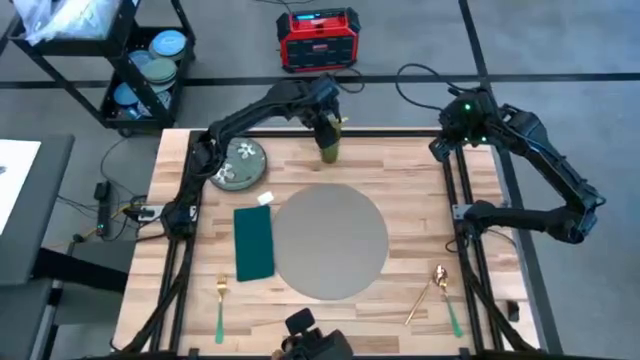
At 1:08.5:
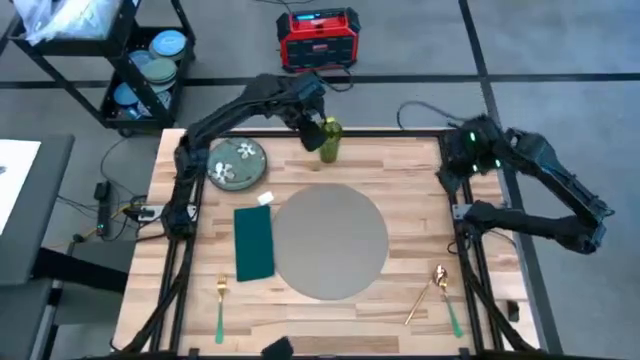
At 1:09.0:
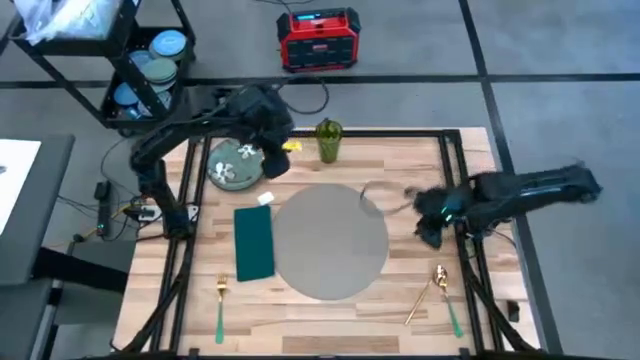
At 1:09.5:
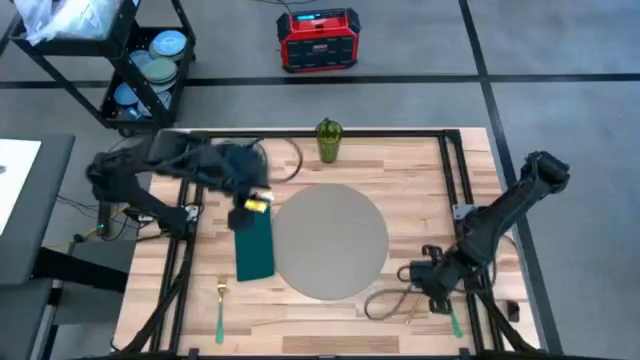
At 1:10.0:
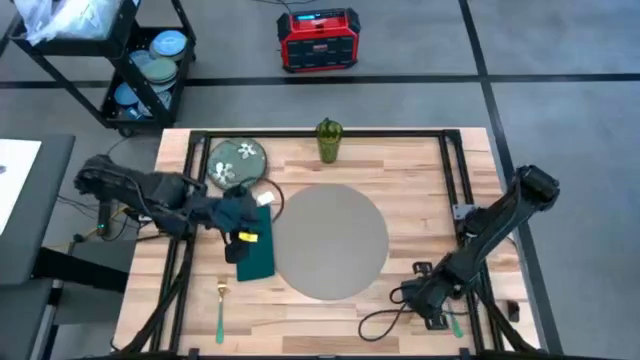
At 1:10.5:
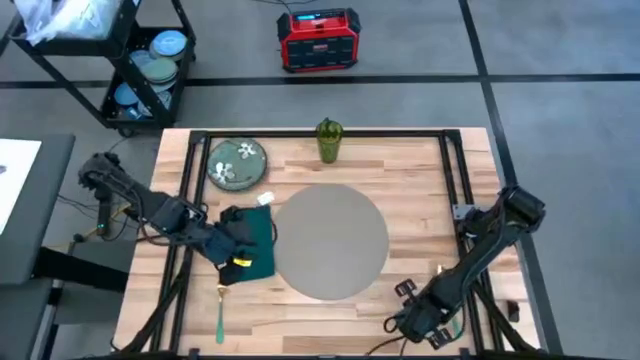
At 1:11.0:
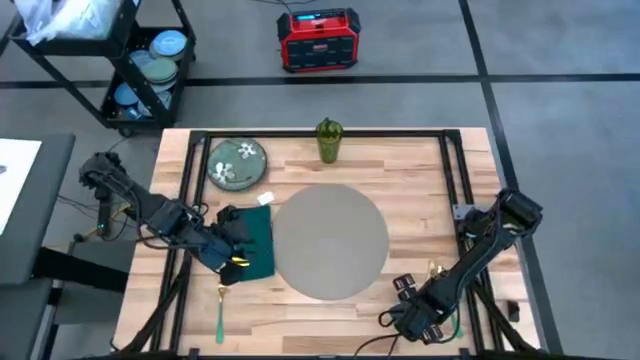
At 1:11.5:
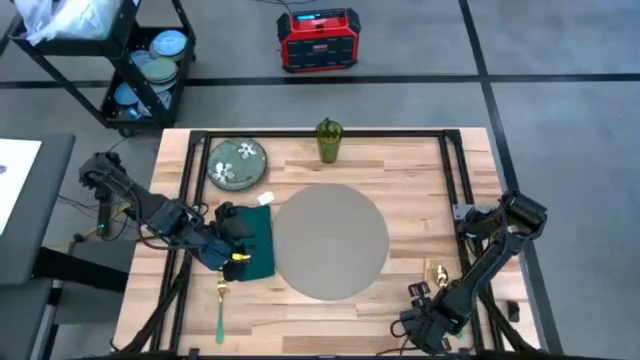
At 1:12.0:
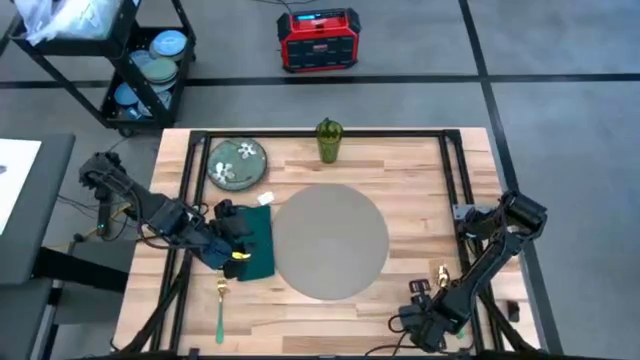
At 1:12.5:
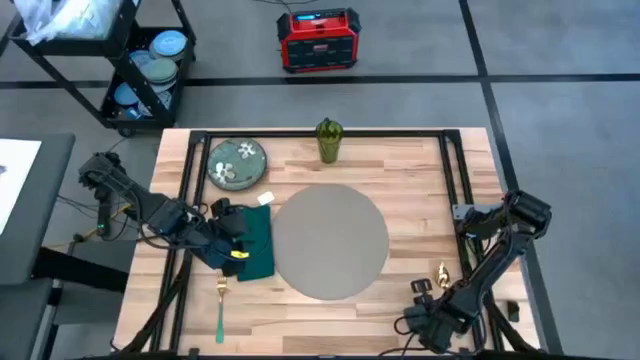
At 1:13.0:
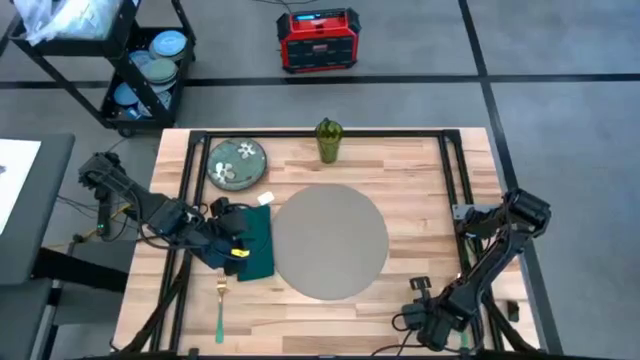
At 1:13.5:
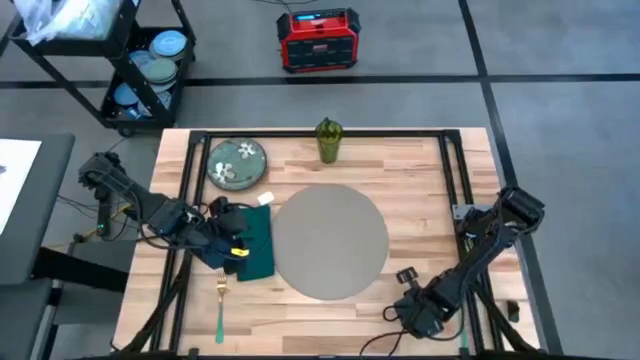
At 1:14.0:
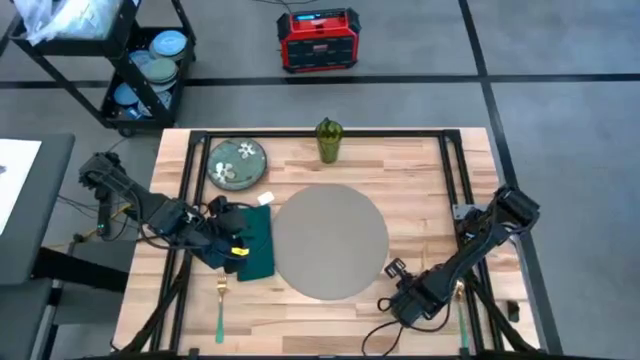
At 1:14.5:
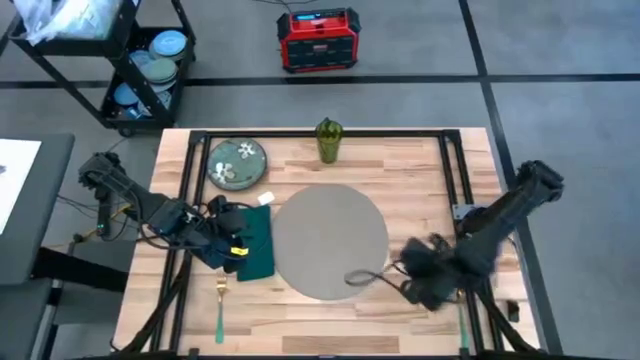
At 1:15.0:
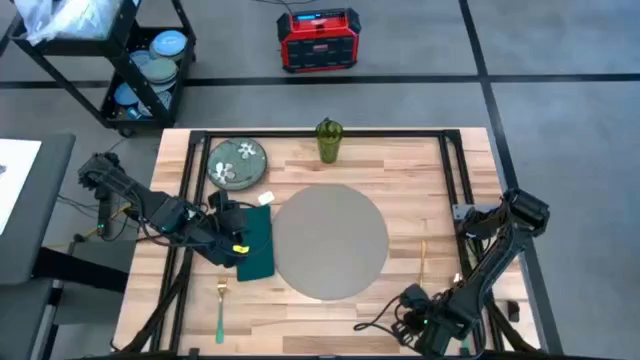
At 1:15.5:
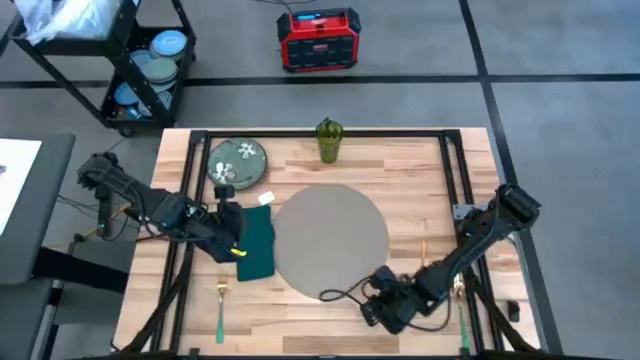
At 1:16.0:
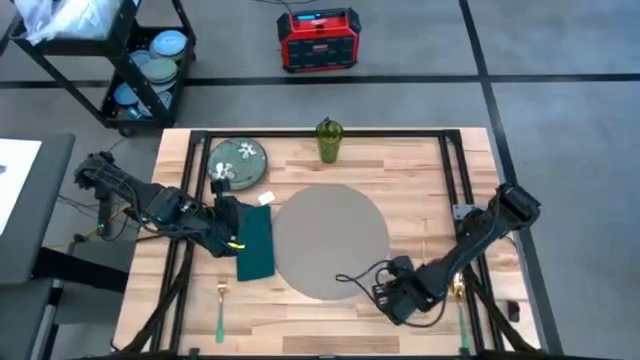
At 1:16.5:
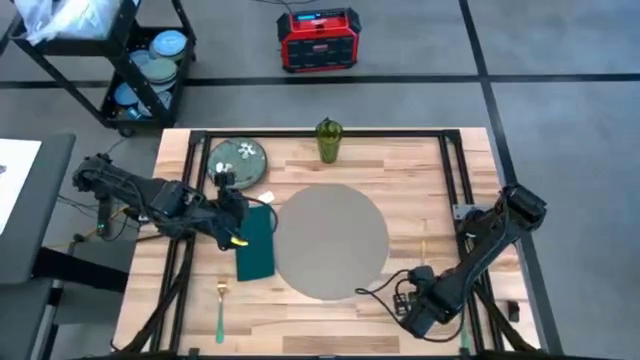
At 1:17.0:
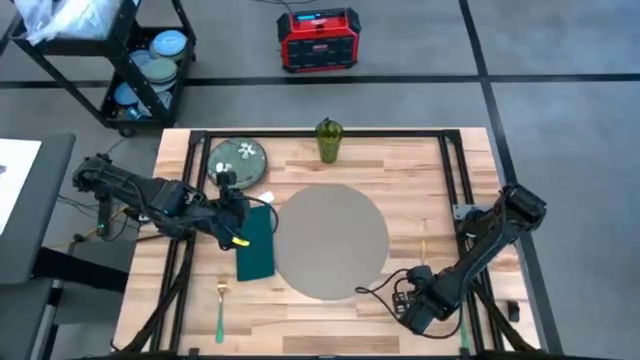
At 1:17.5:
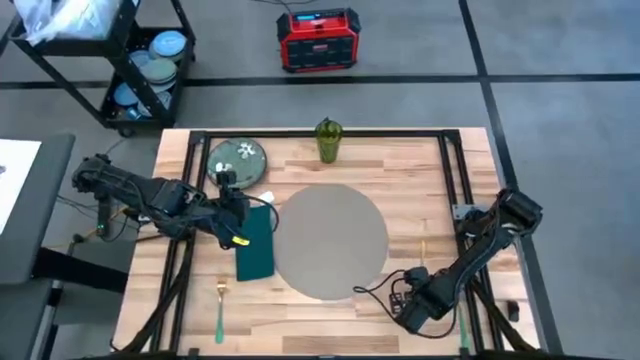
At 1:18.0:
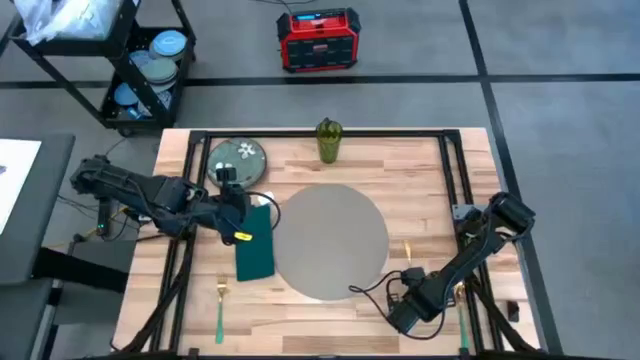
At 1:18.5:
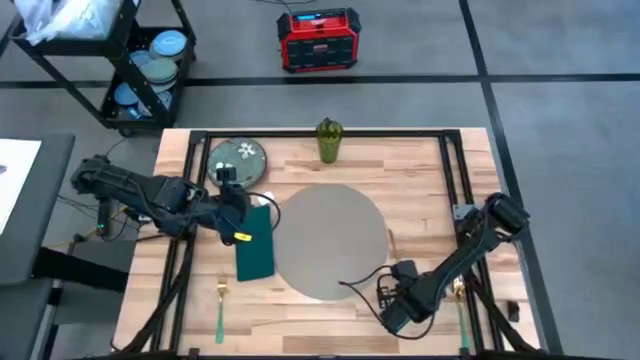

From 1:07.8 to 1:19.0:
Task: Set table place
Put the gold knife on the gray table mat

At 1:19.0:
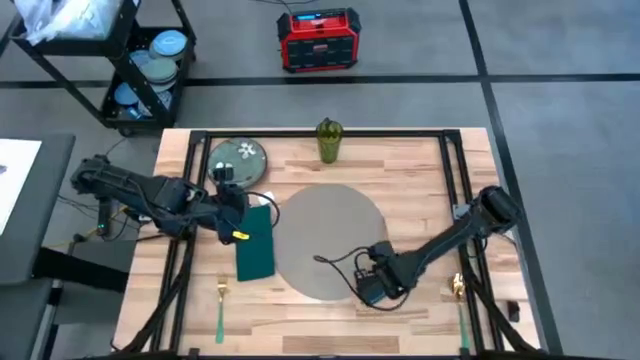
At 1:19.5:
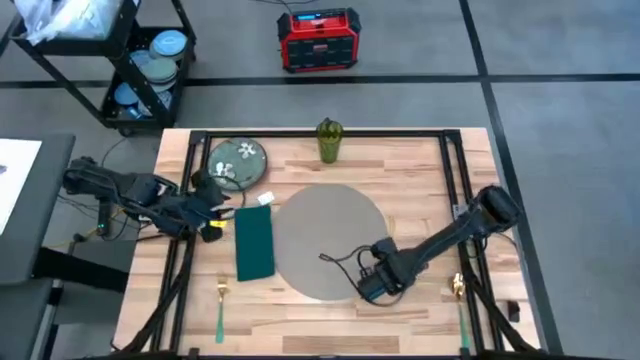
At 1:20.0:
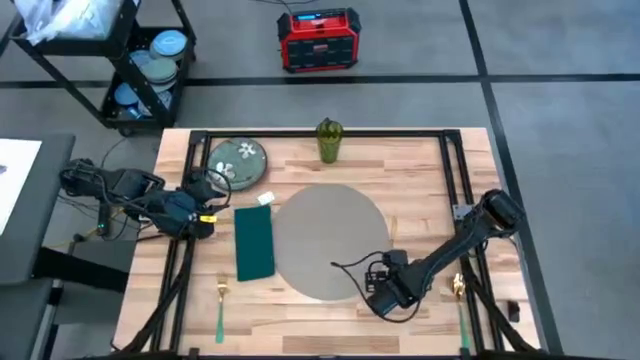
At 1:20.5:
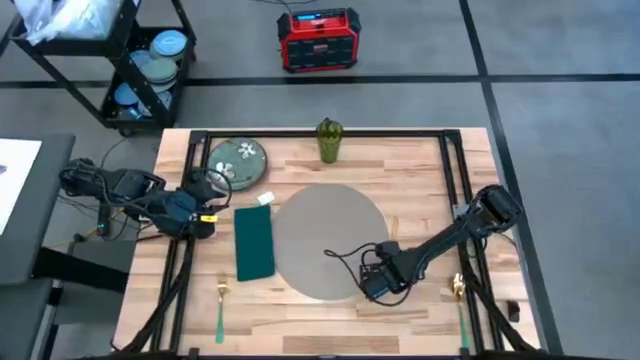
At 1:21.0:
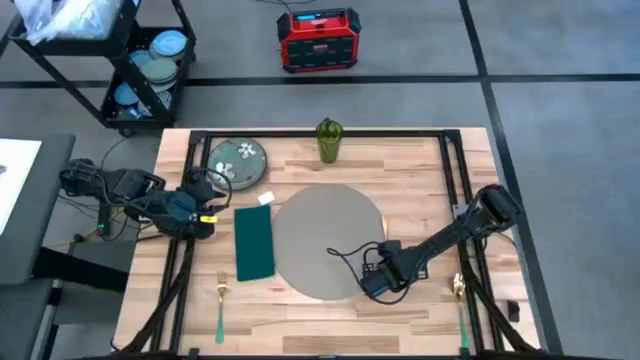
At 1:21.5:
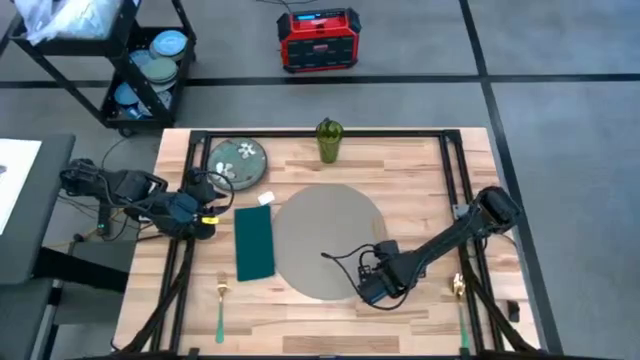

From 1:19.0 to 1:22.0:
Put the gold knife on the gray table mat

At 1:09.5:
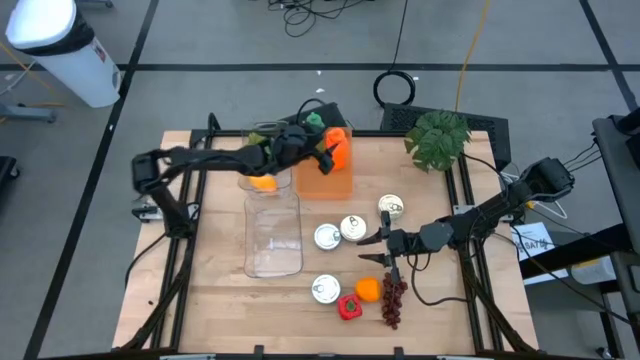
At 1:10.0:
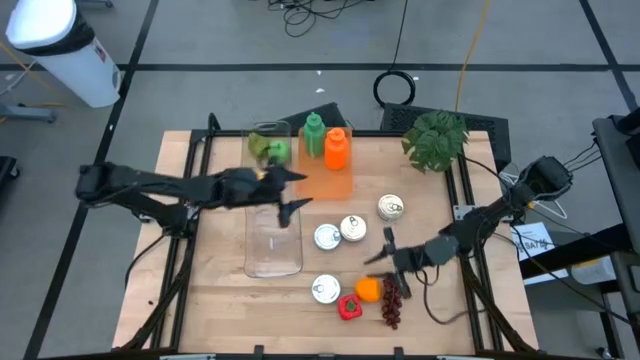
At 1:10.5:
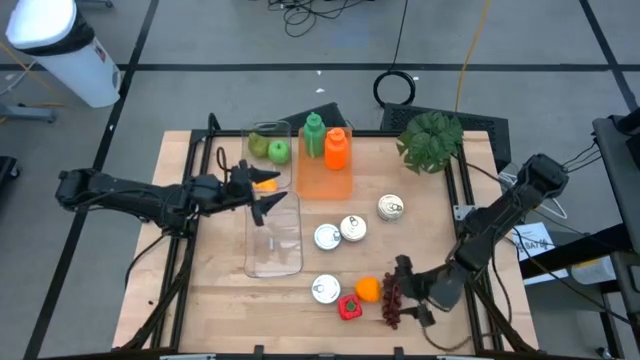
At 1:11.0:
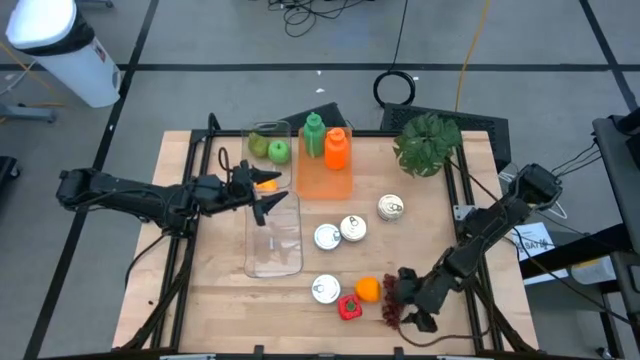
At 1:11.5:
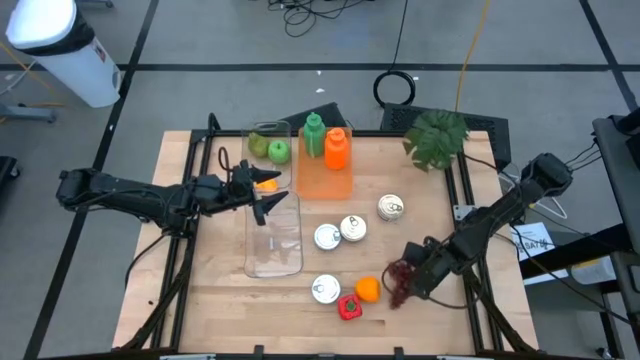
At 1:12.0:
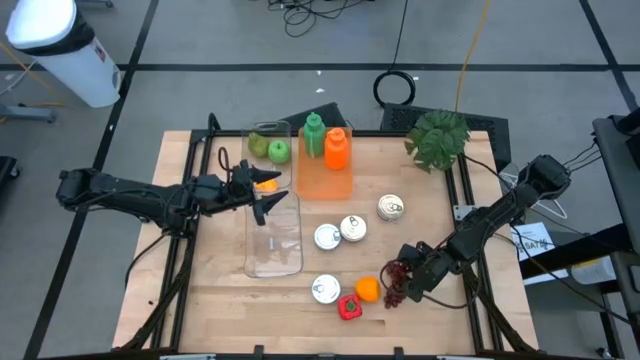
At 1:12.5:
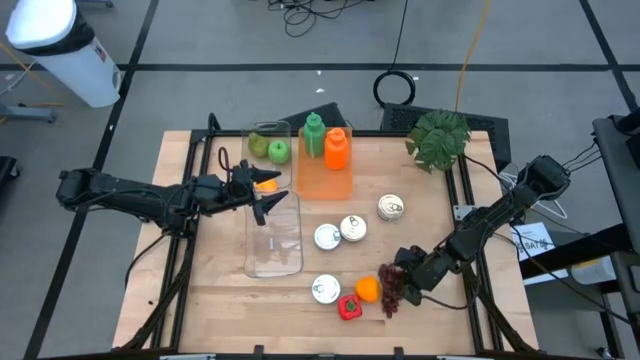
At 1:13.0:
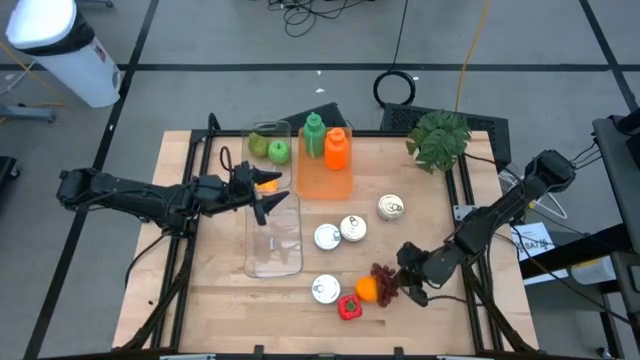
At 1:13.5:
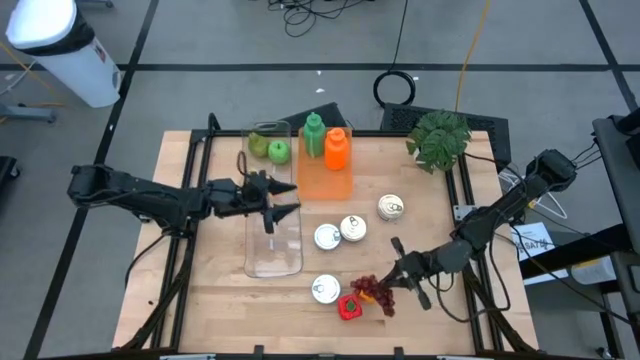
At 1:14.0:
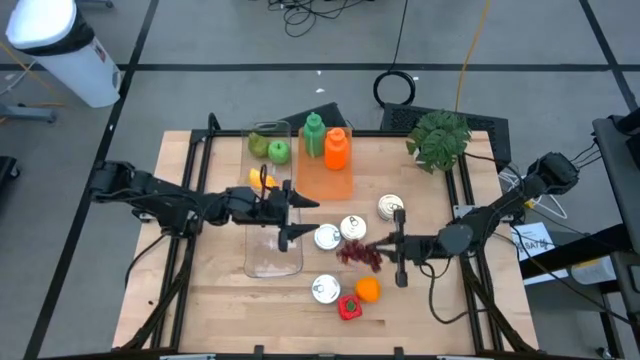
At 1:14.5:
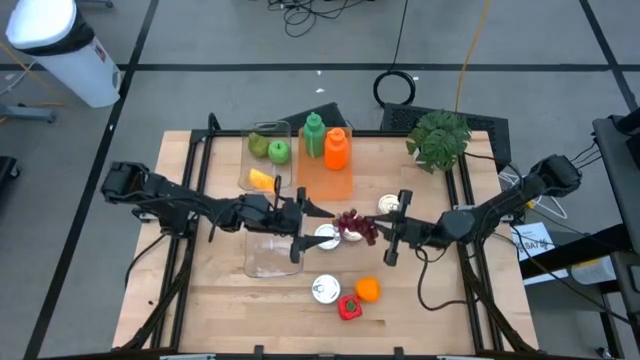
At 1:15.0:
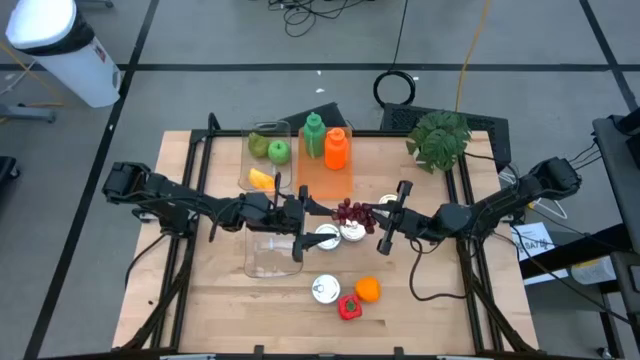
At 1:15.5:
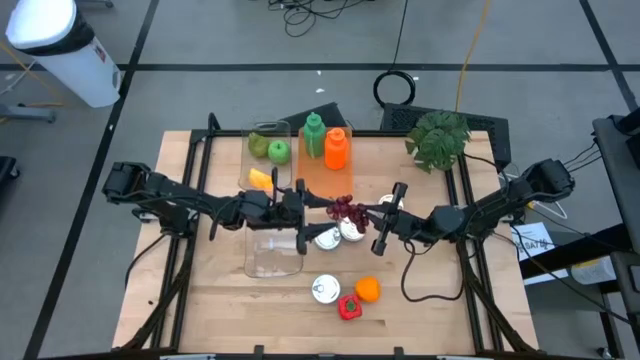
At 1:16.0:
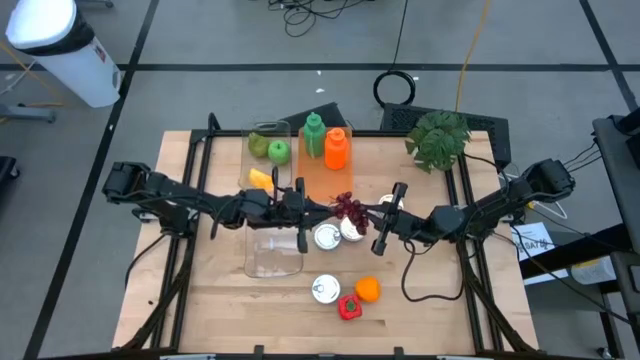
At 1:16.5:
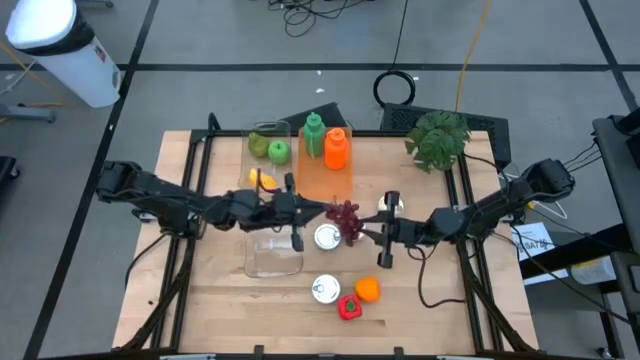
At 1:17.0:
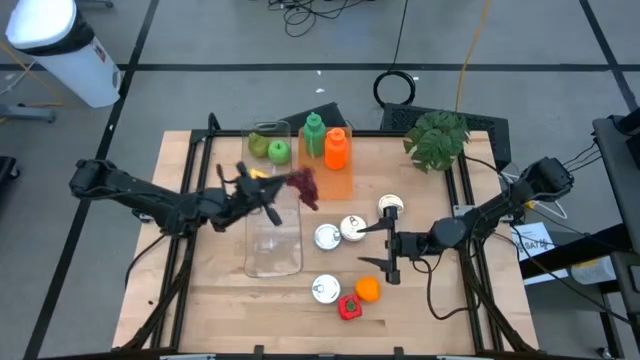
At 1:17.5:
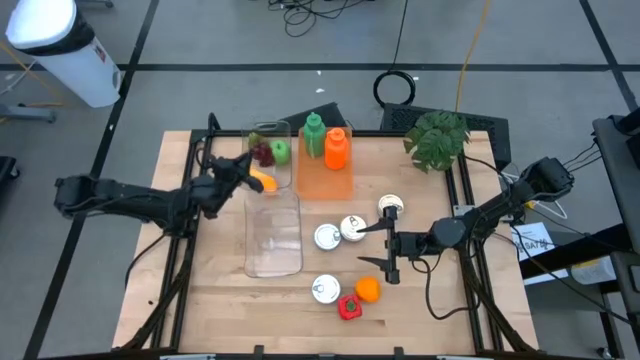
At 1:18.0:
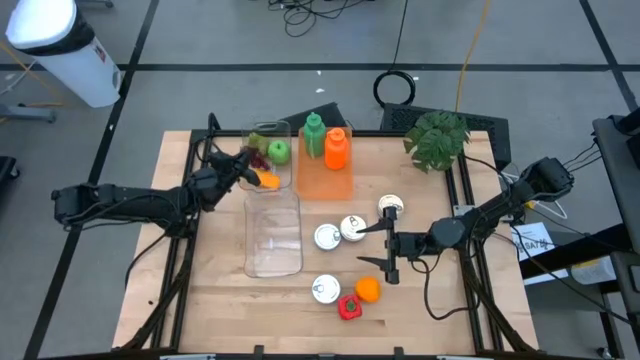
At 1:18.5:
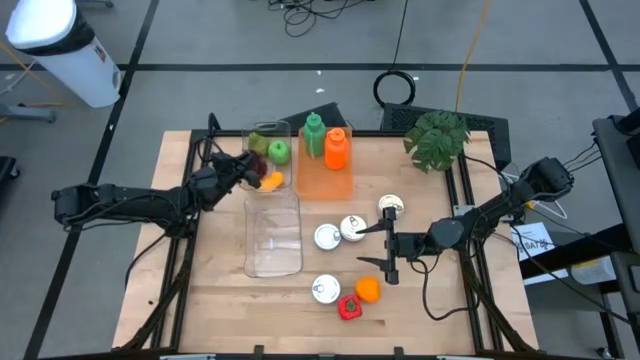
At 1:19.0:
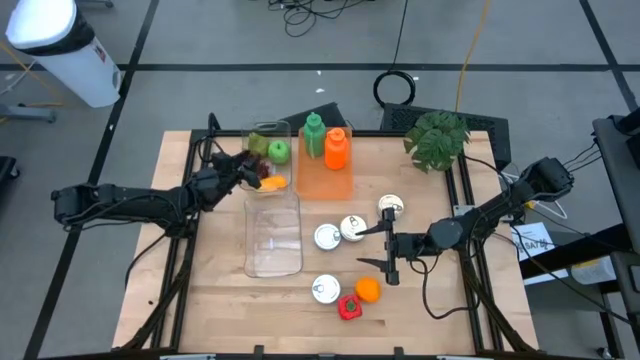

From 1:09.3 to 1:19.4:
Task: Pick & Place Food Item
Put the red grapes into the top transparent bin
